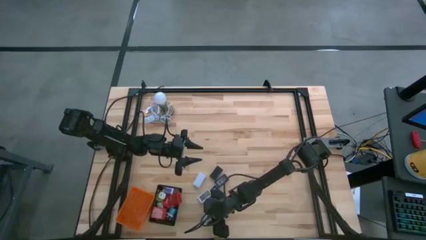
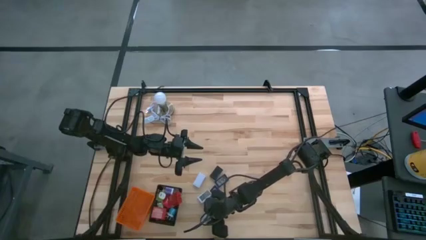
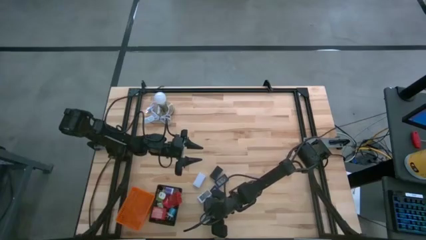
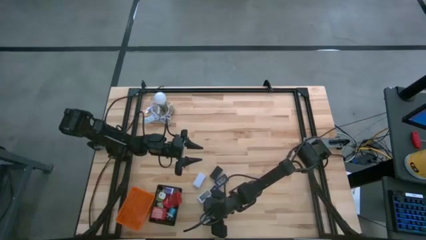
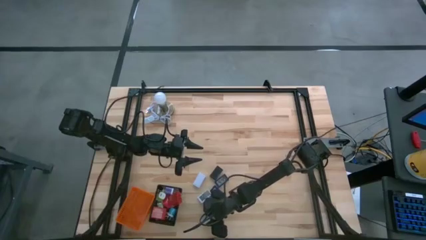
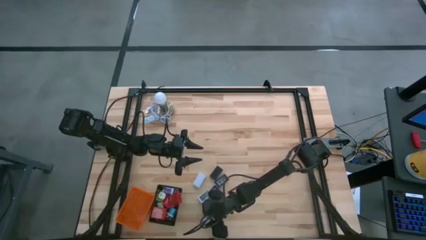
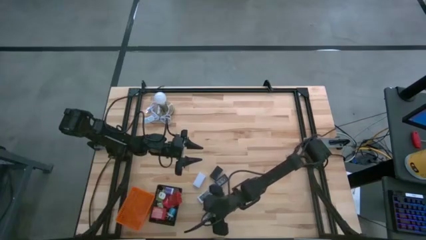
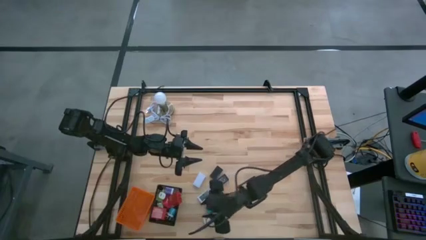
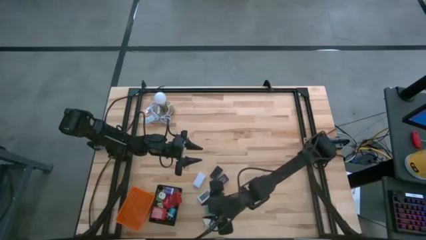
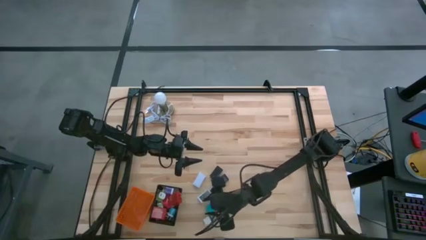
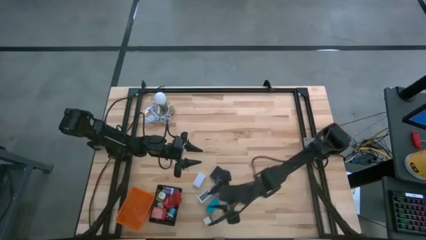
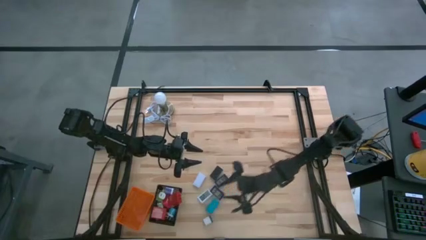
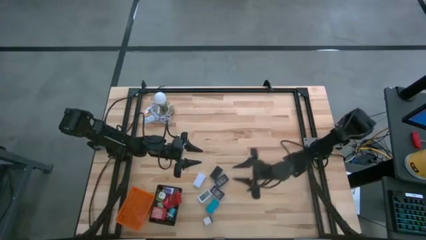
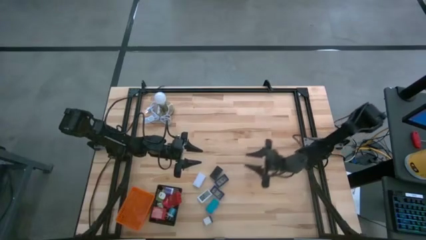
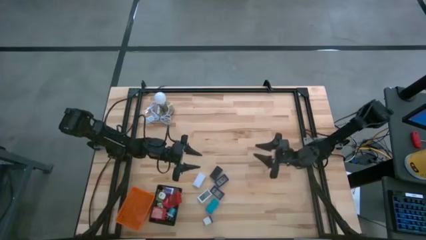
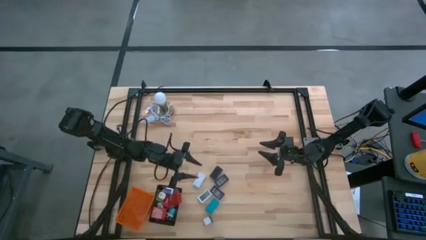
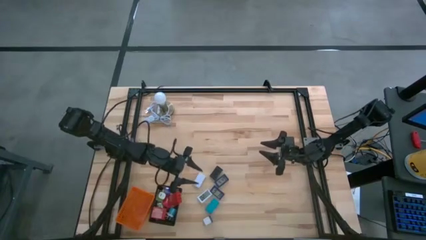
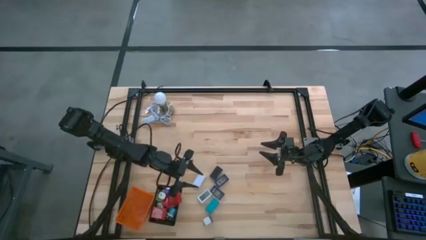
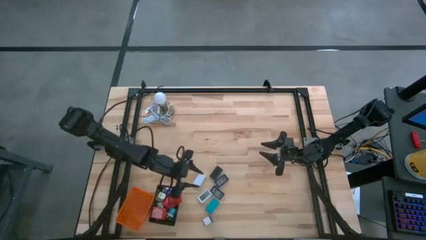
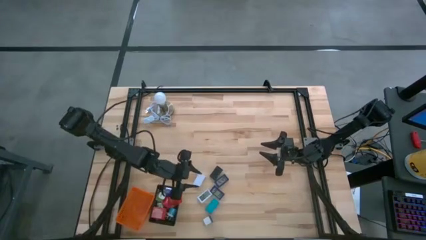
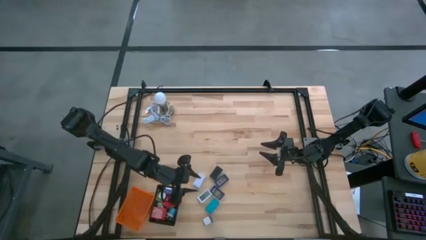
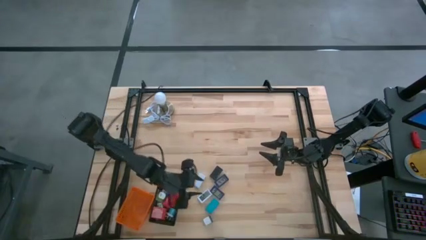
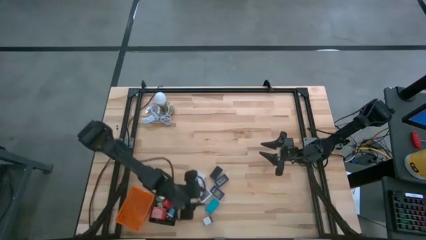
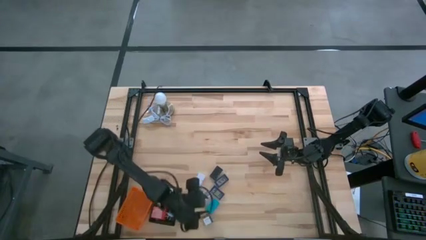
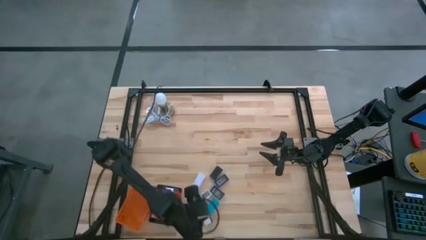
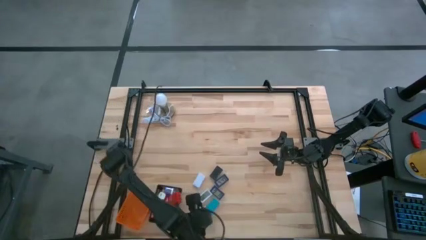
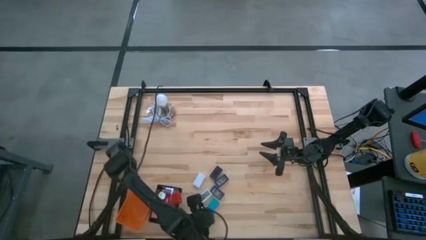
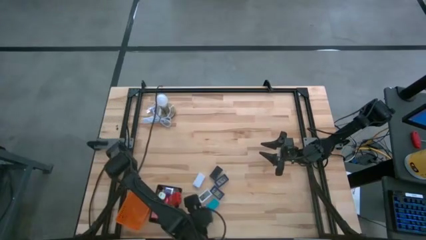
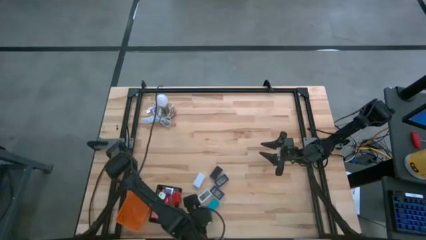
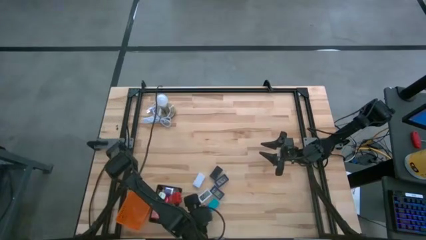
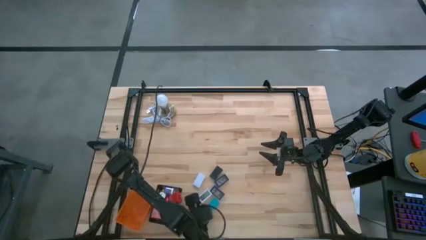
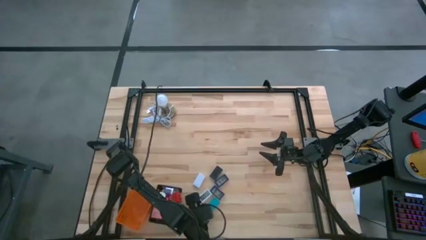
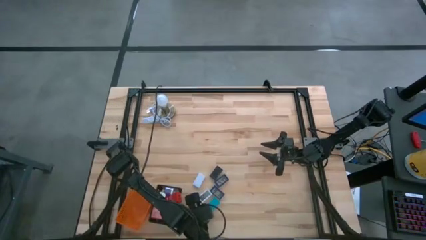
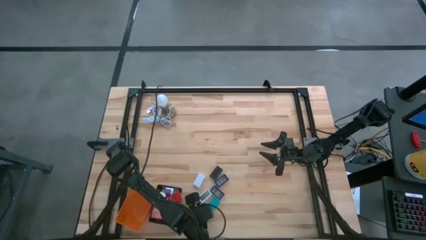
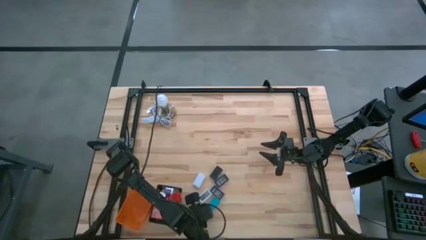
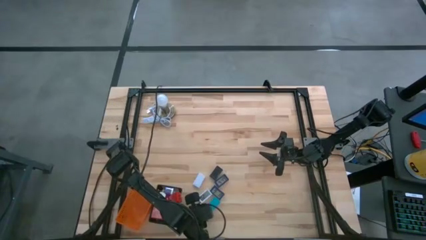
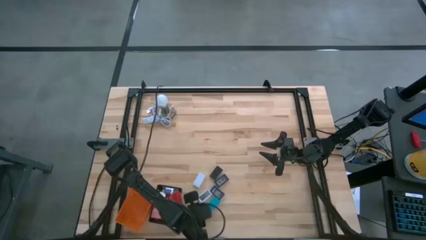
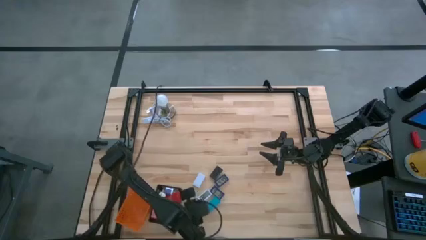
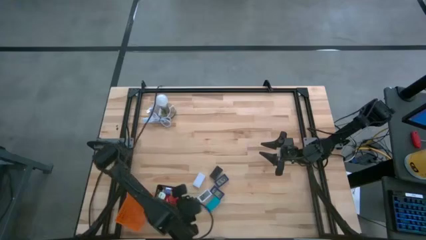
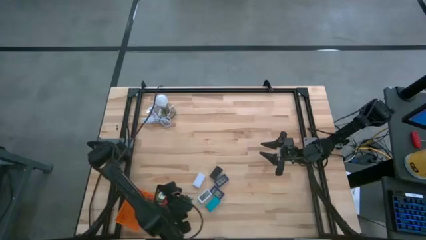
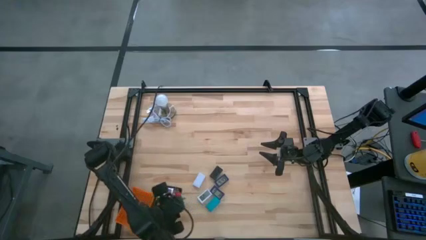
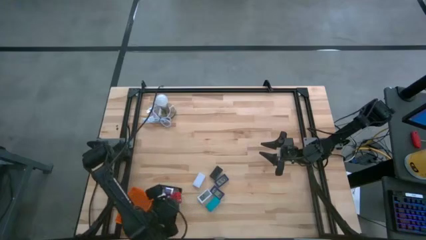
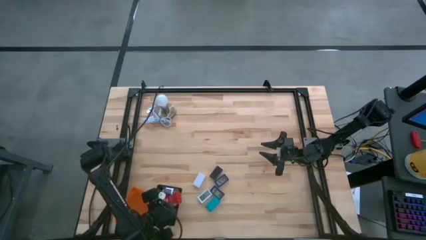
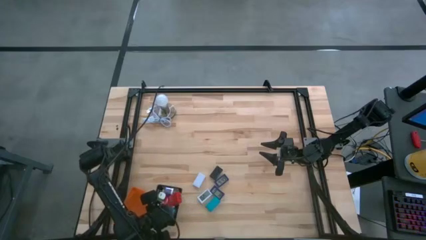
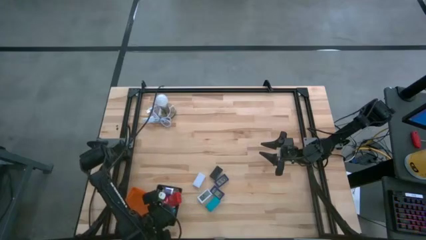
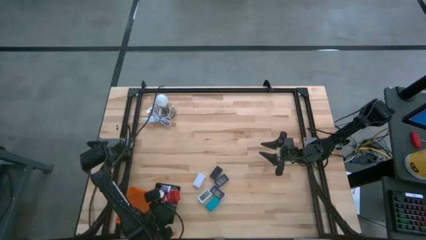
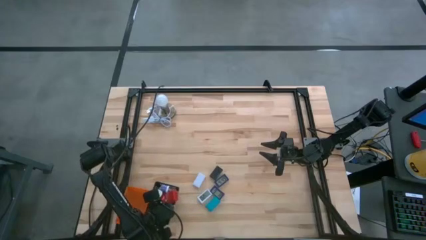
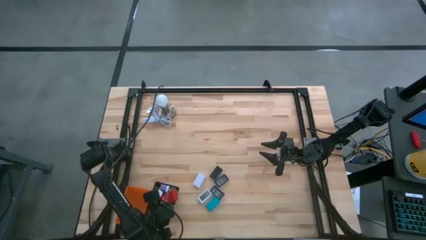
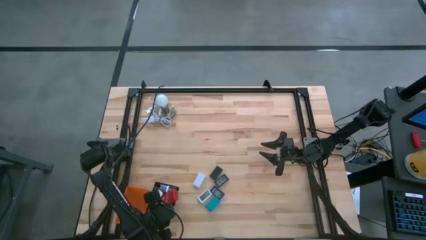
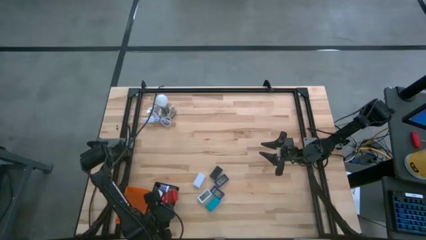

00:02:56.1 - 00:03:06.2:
Task: Pick & Place Office items
Put the white charger adapter into the black basket
